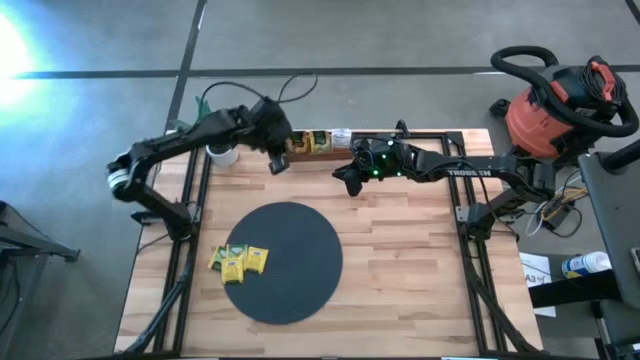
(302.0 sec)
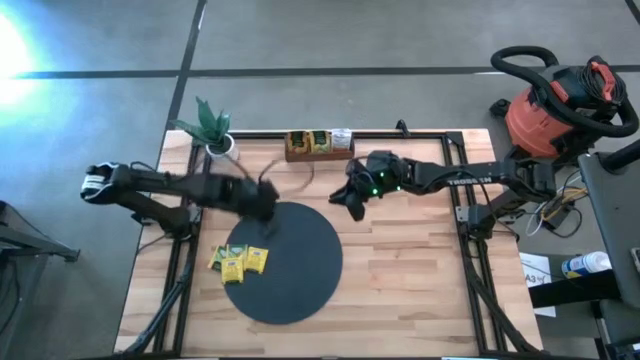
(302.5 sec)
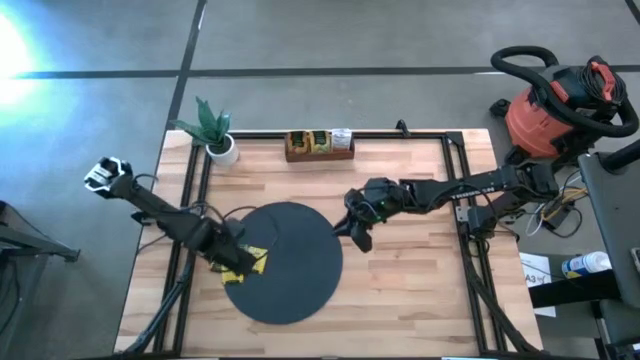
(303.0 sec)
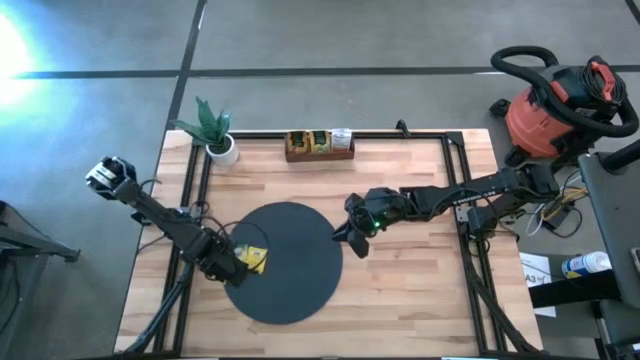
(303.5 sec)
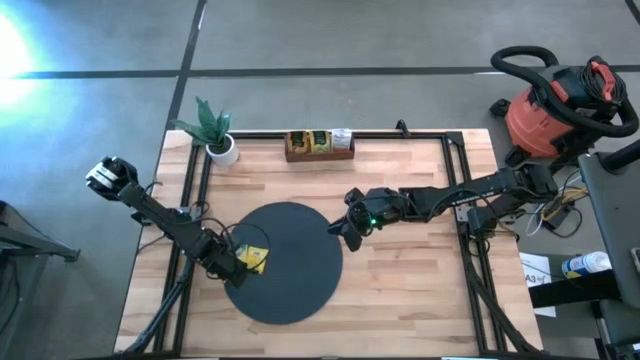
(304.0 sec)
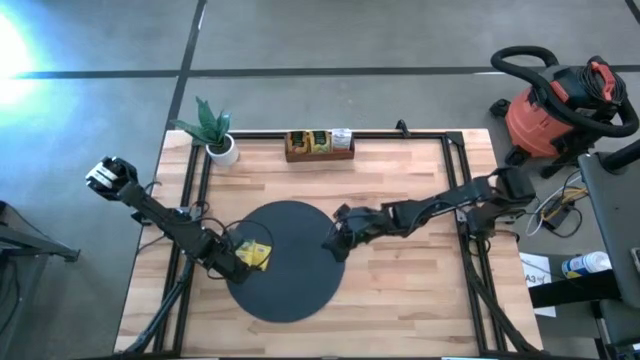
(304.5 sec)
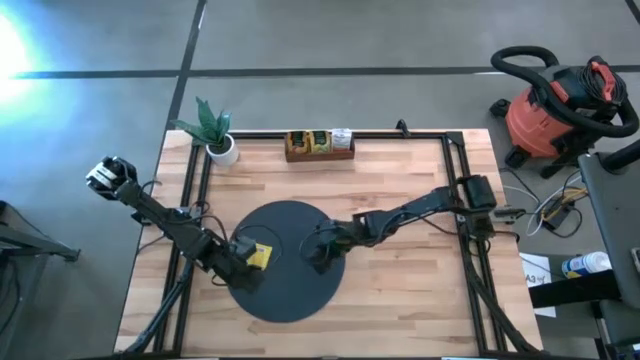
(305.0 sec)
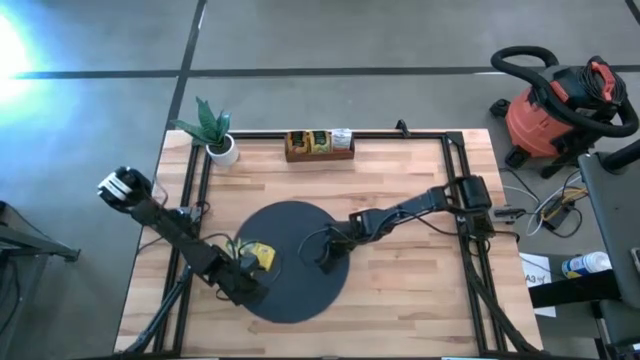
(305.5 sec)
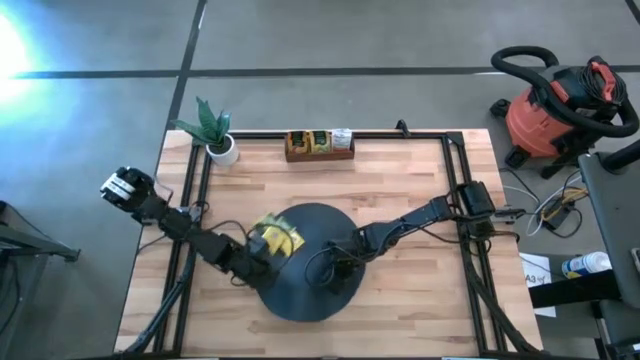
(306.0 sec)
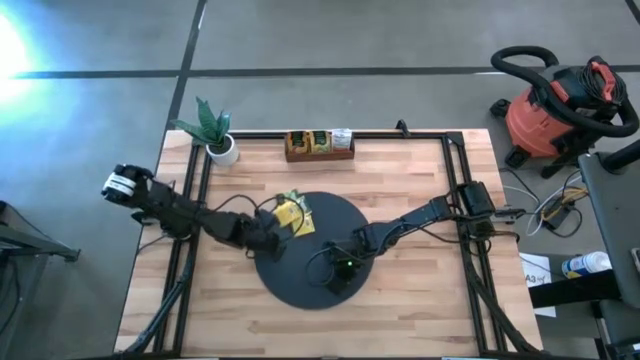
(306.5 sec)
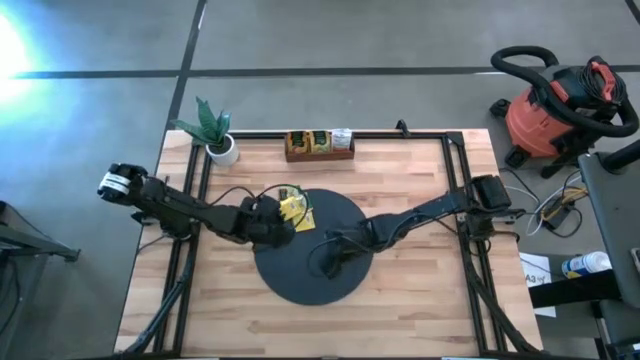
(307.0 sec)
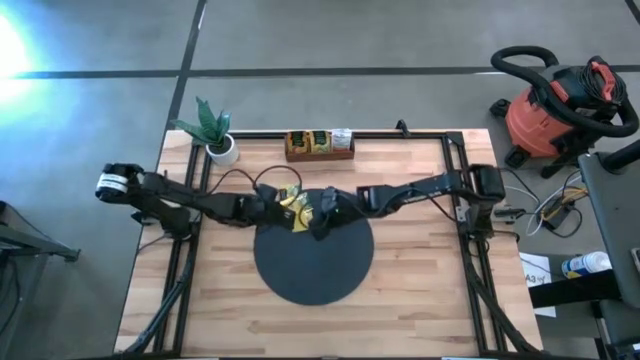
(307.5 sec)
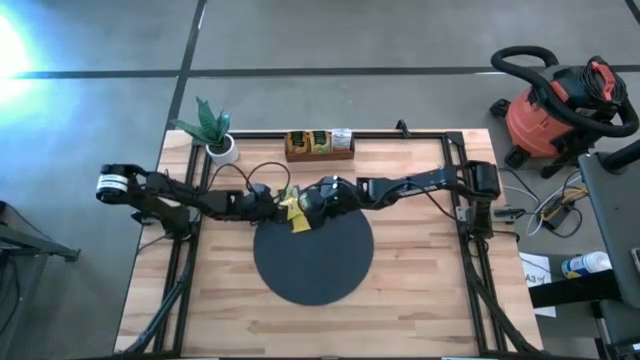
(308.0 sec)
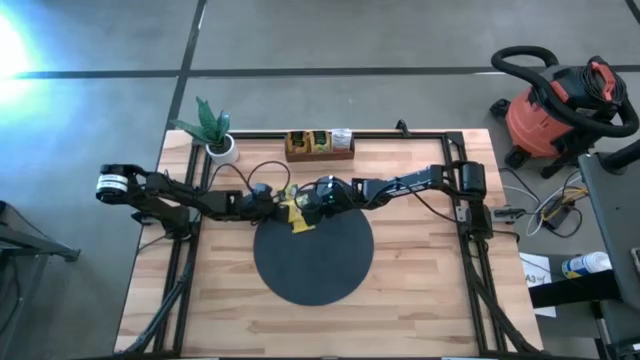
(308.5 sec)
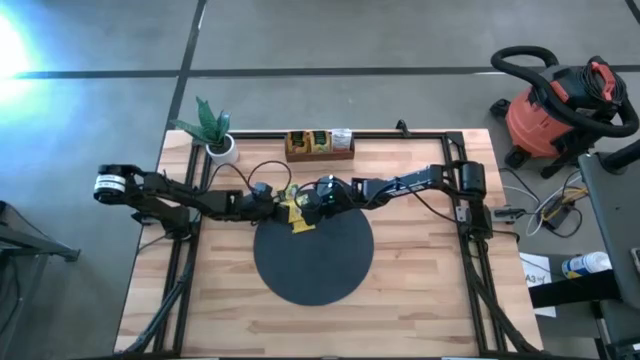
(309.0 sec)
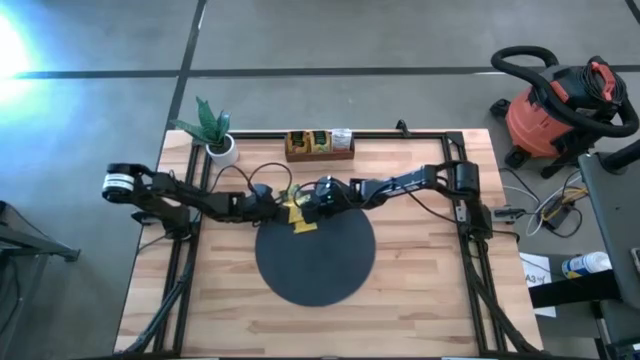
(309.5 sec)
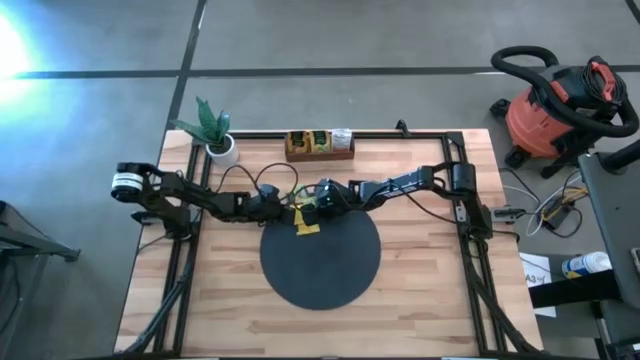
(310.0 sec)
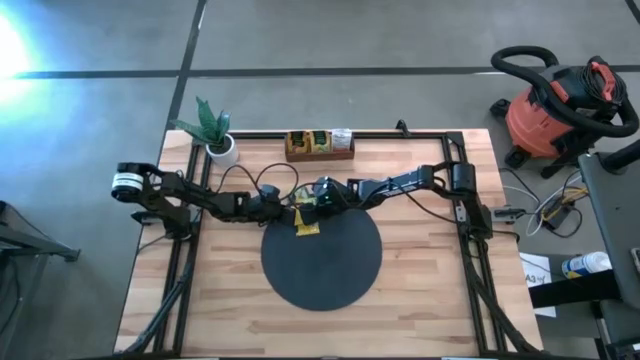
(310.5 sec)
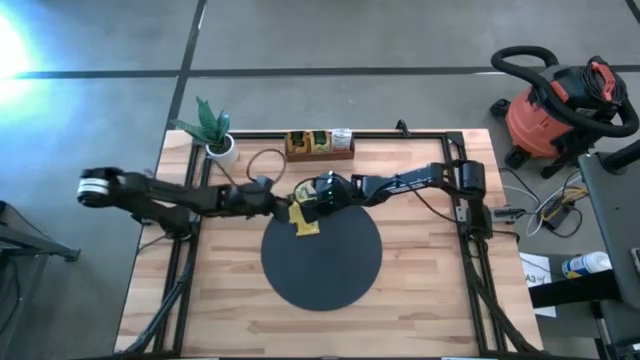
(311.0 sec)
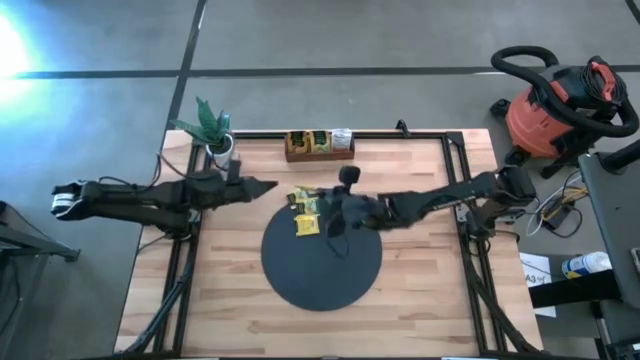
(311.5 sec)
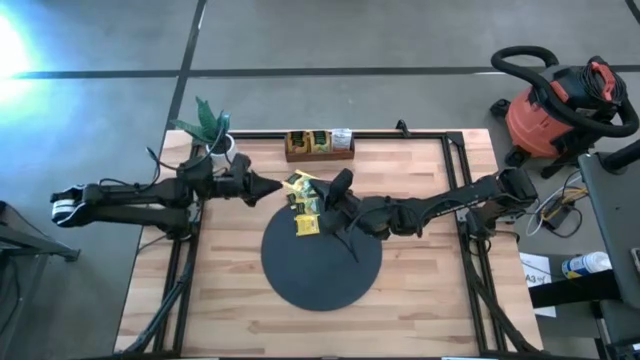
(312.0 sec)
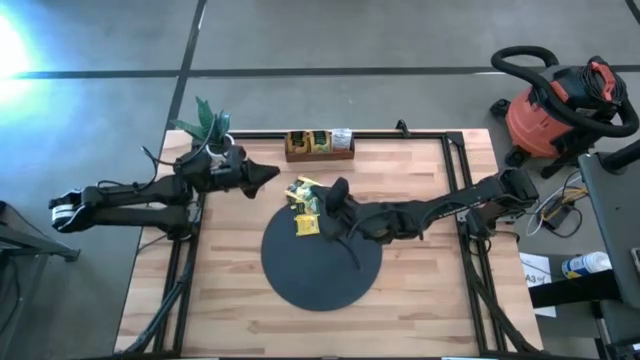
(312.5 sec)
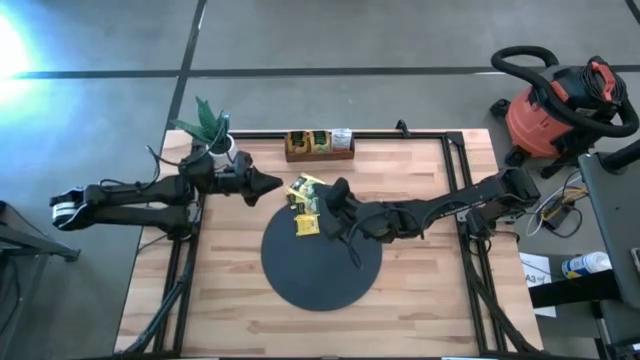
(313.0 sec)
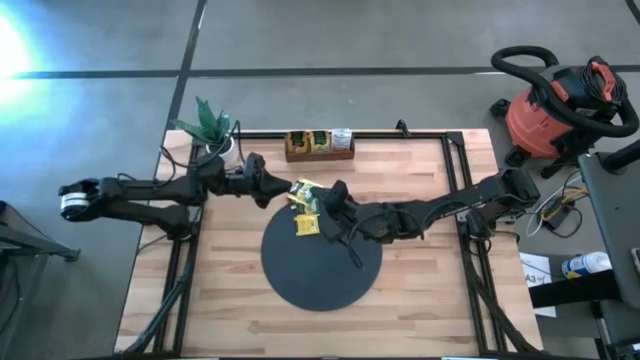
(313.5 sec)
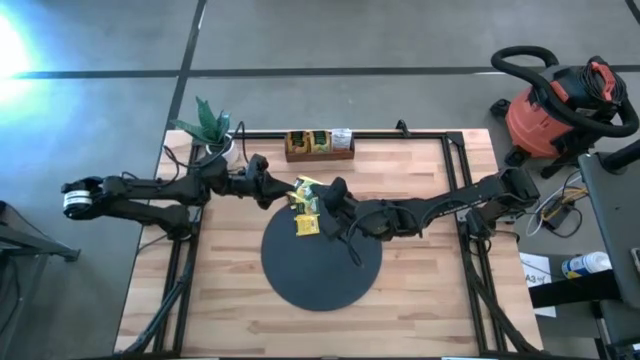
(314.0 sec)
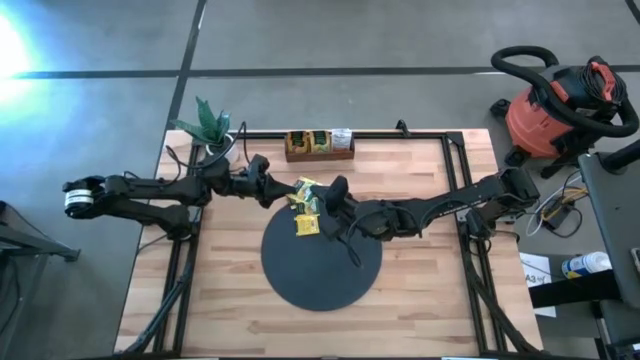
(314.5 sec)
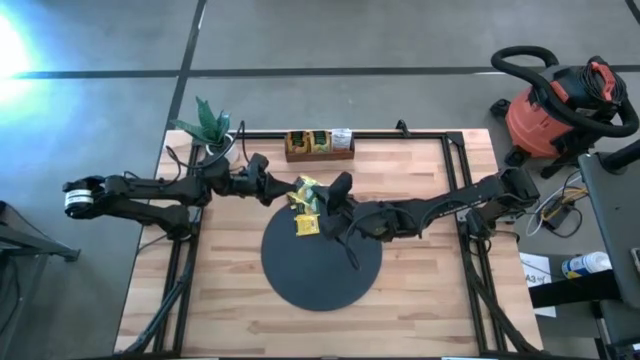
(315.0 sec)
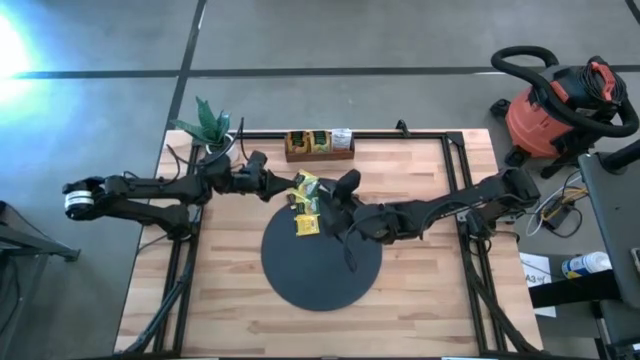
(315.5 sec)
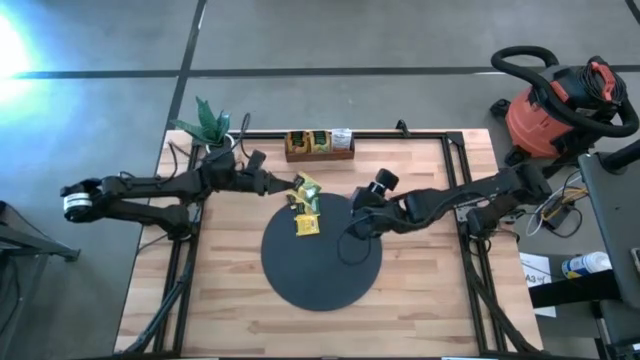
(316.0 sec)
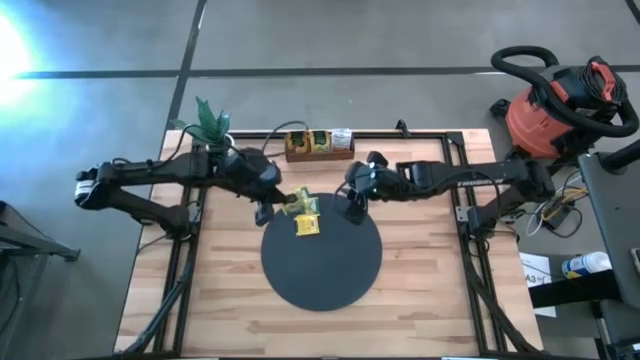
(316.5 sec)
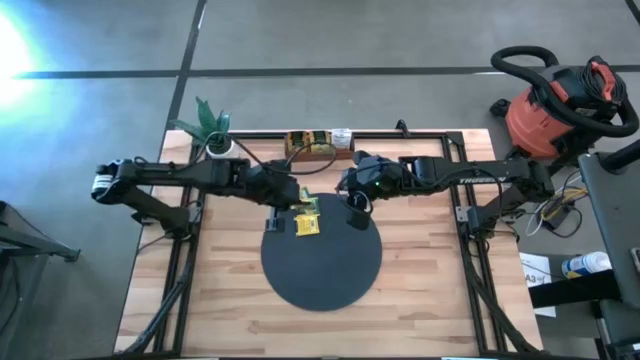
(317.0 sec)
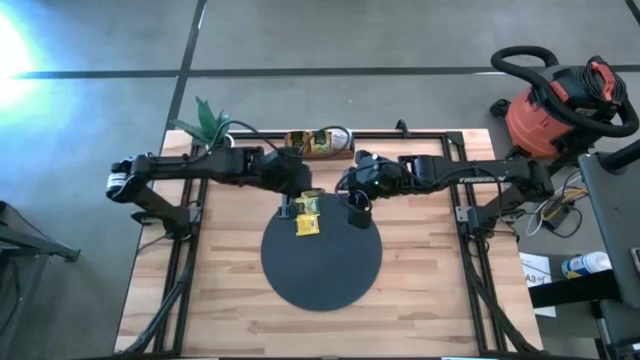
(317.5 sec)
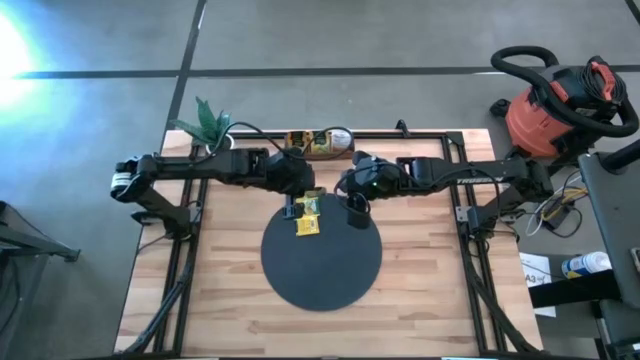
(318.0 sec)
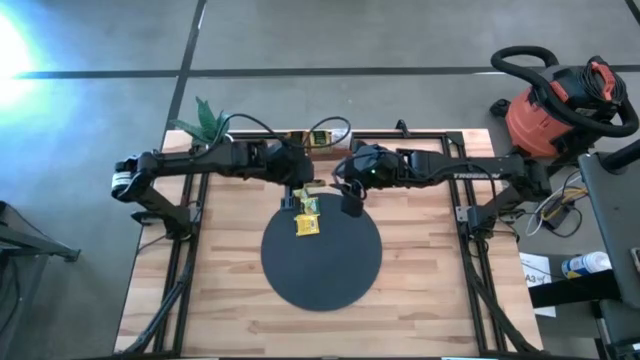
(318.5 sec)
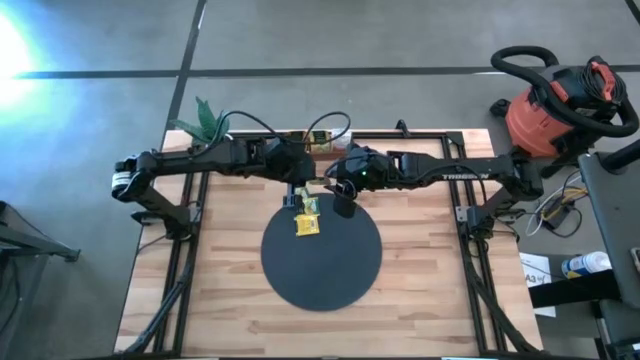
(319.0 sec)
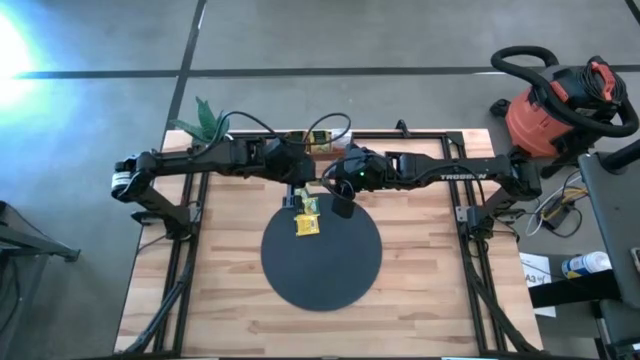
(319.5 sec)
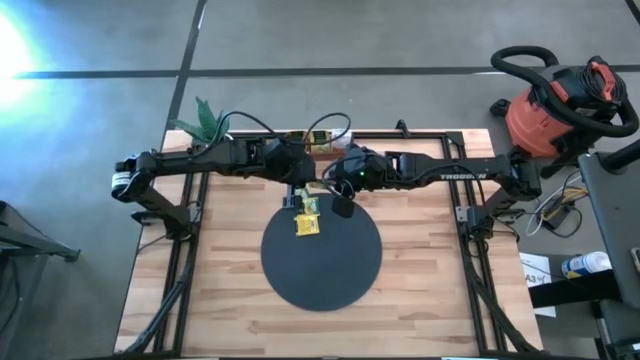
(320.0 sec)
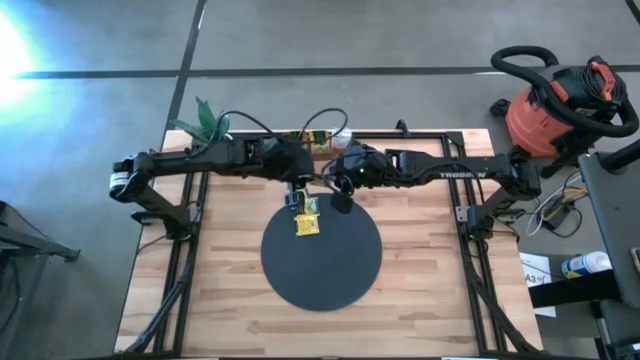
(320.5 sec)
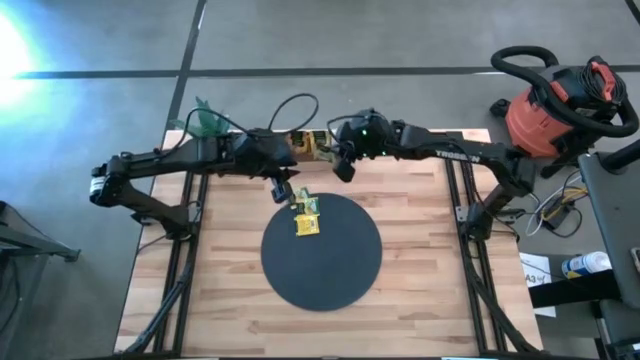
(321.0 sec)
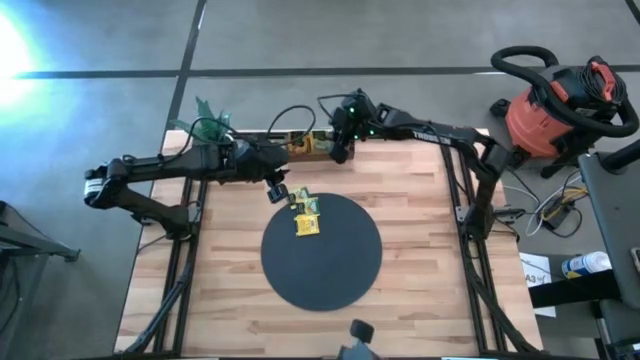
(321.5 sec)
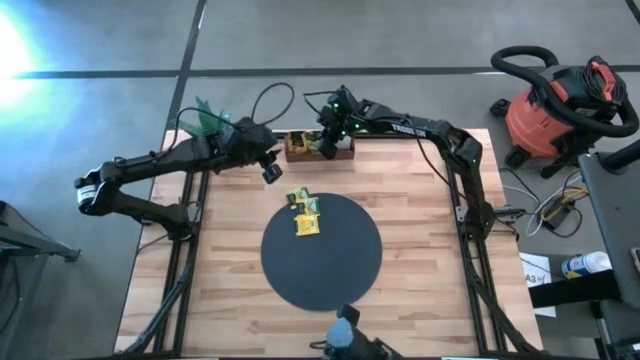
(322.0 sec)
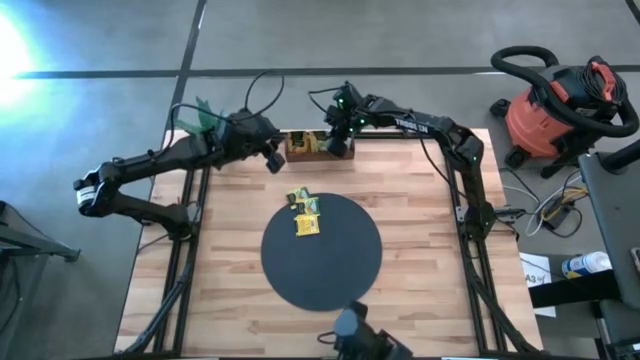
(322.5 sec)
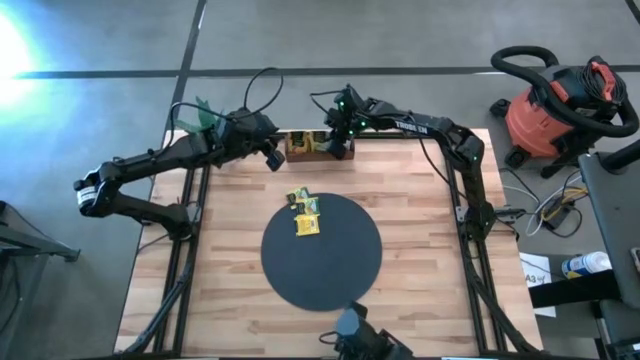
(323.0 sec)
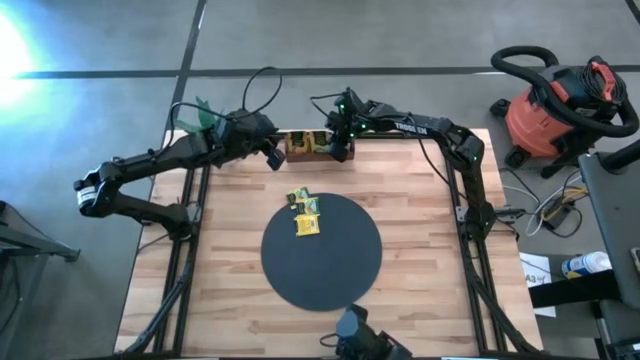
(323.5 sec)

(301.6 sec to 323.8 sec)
Task: Pick & Place Tea
Put the yellow tea bag into the middle section of the wooden organizer
